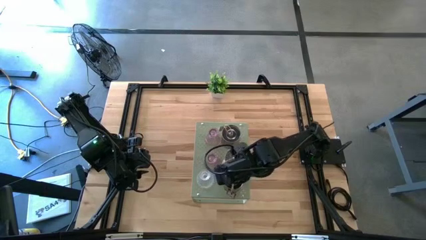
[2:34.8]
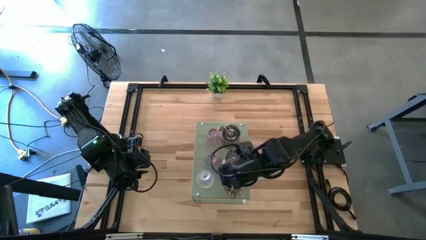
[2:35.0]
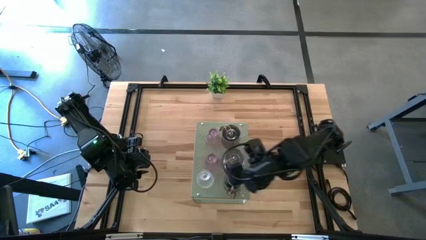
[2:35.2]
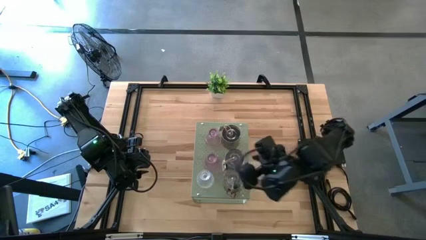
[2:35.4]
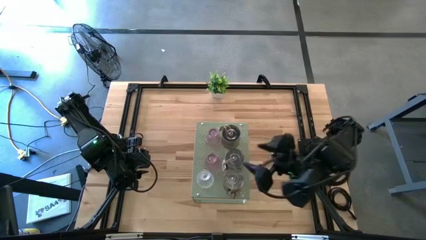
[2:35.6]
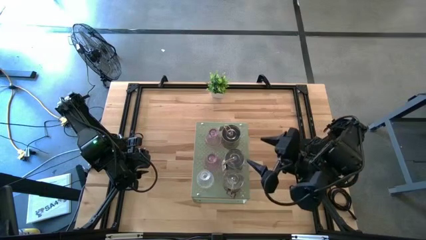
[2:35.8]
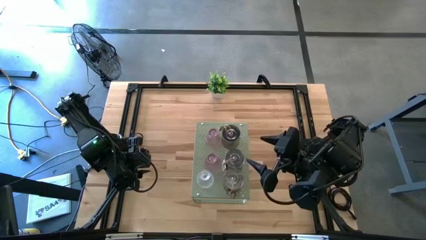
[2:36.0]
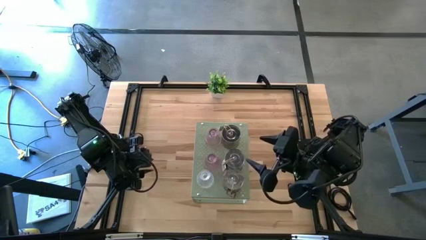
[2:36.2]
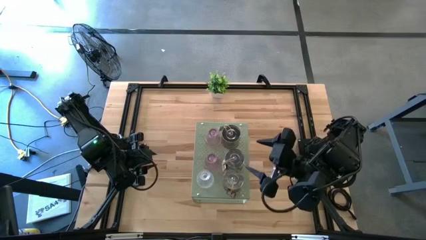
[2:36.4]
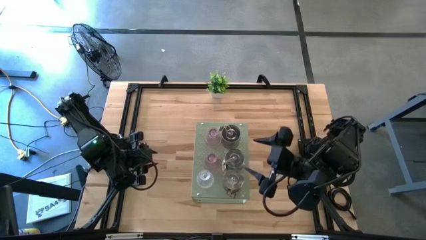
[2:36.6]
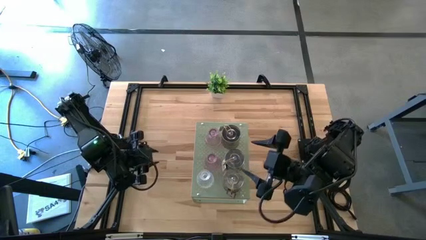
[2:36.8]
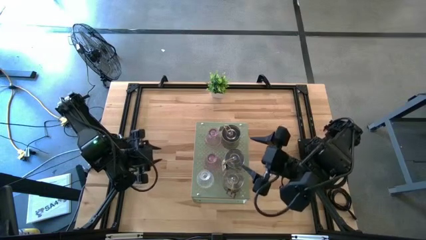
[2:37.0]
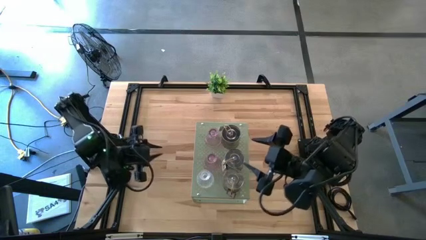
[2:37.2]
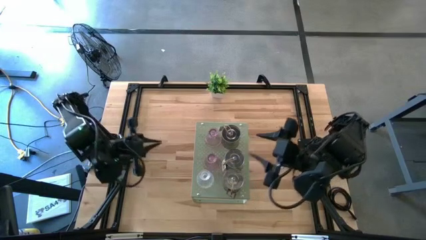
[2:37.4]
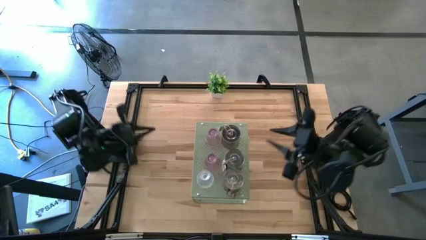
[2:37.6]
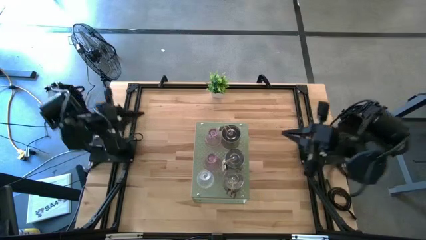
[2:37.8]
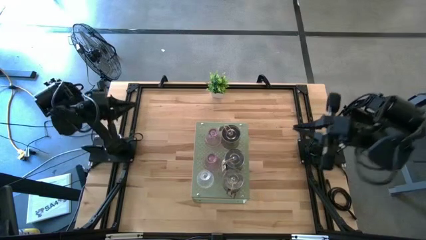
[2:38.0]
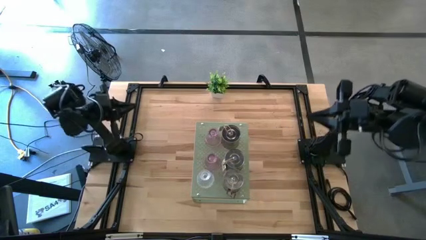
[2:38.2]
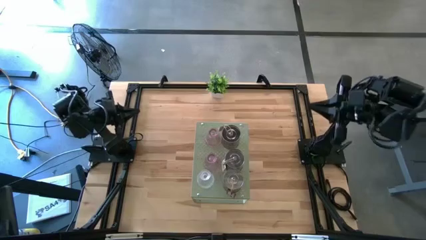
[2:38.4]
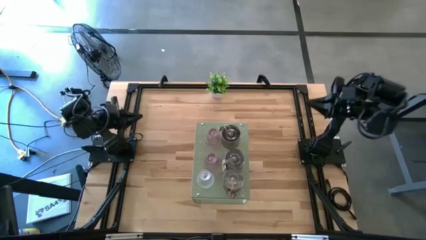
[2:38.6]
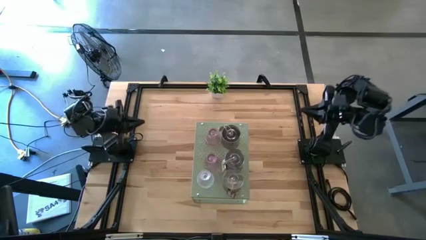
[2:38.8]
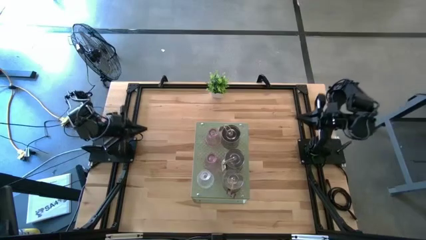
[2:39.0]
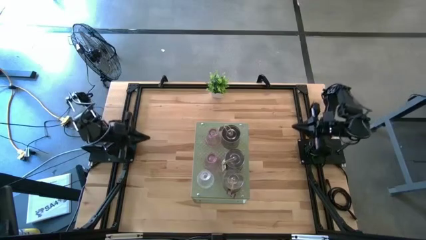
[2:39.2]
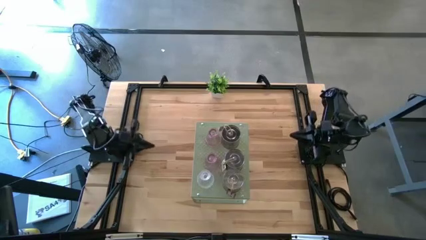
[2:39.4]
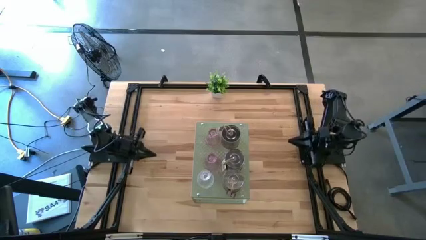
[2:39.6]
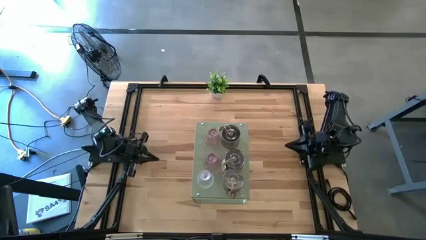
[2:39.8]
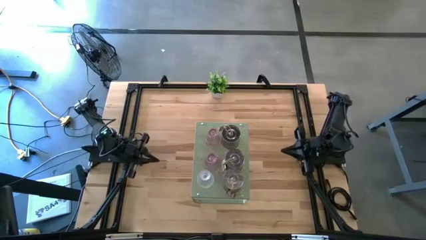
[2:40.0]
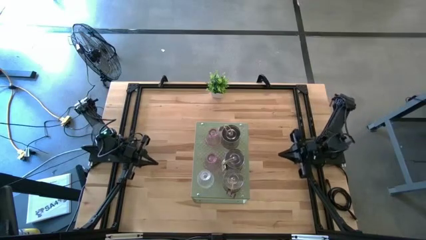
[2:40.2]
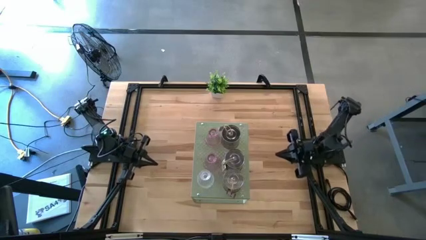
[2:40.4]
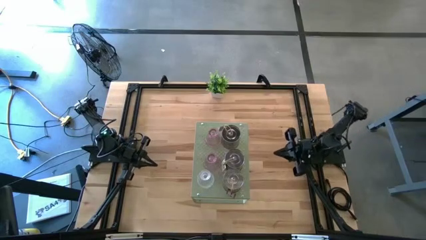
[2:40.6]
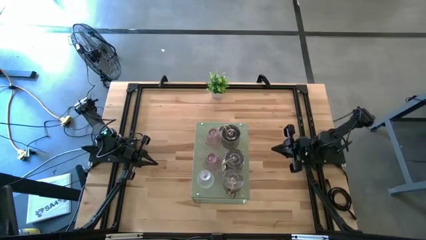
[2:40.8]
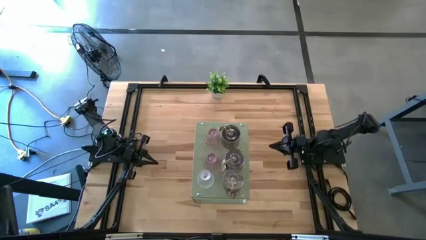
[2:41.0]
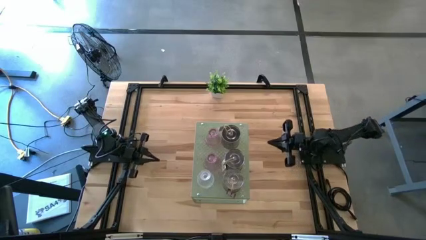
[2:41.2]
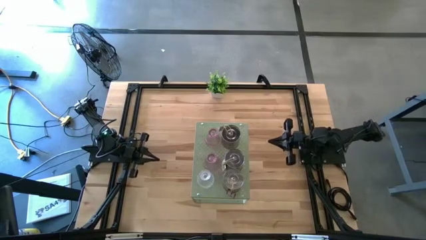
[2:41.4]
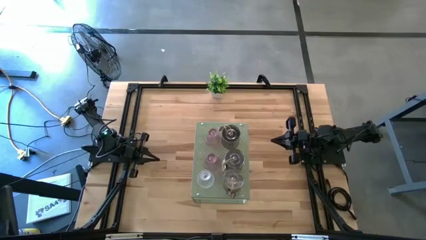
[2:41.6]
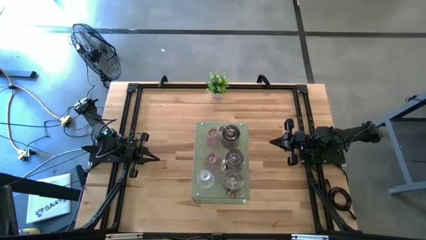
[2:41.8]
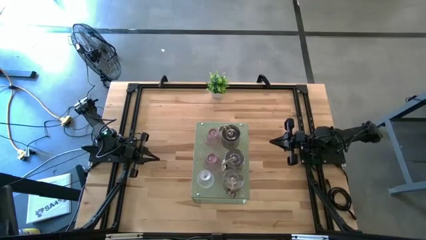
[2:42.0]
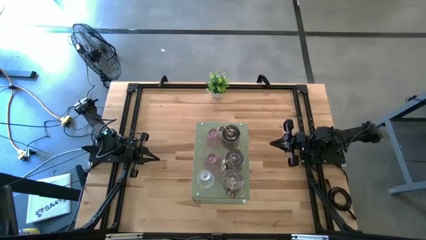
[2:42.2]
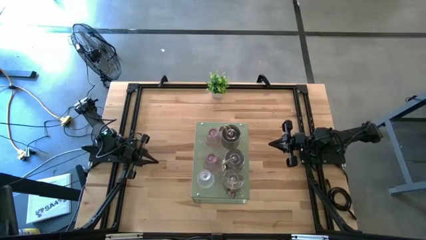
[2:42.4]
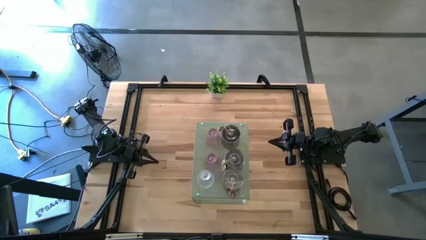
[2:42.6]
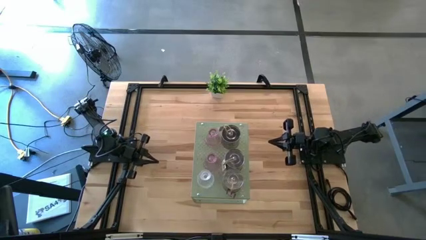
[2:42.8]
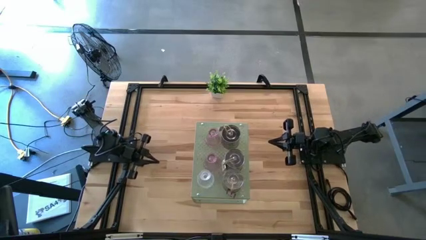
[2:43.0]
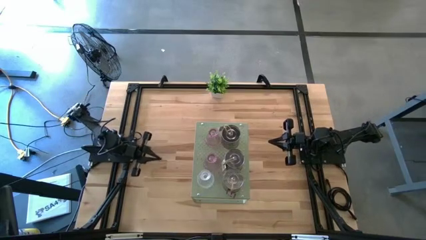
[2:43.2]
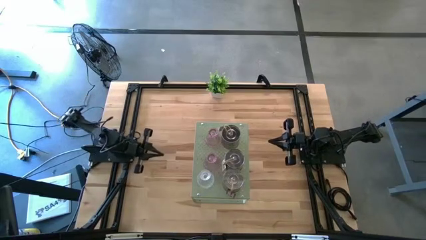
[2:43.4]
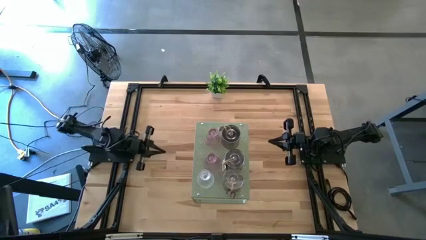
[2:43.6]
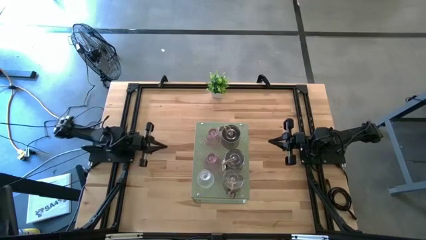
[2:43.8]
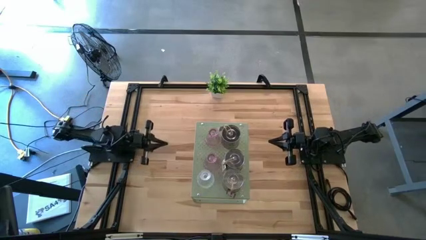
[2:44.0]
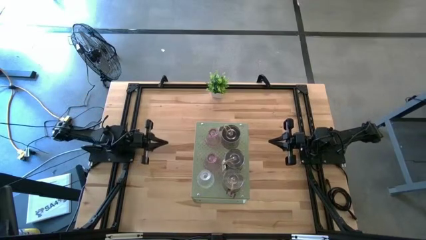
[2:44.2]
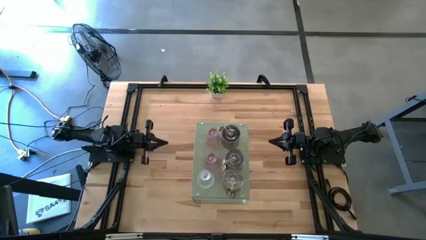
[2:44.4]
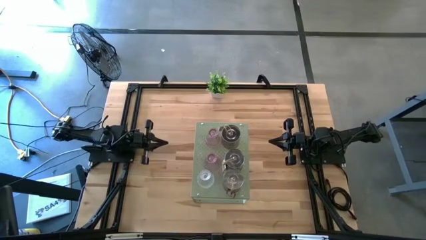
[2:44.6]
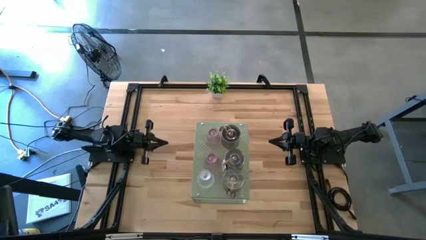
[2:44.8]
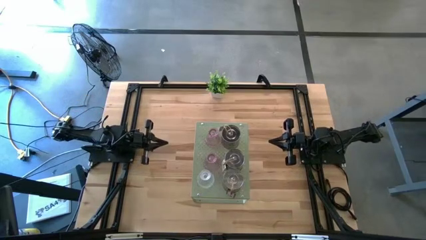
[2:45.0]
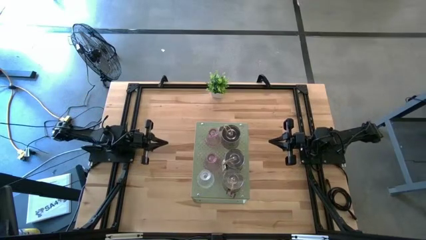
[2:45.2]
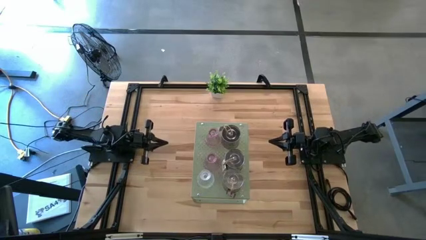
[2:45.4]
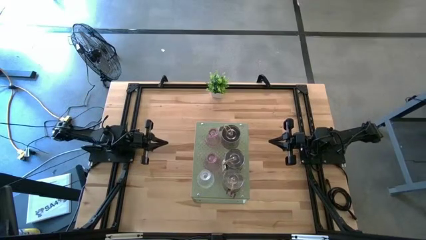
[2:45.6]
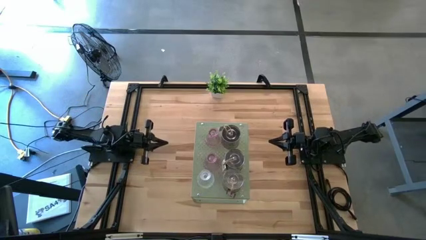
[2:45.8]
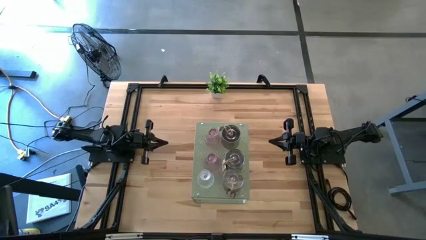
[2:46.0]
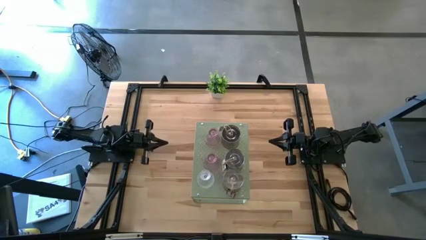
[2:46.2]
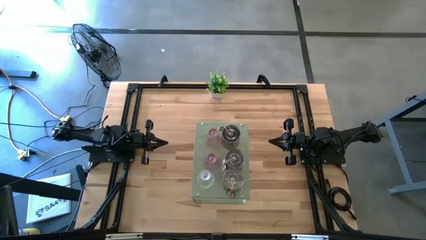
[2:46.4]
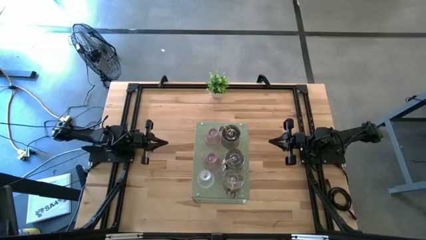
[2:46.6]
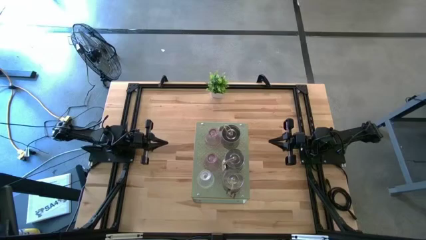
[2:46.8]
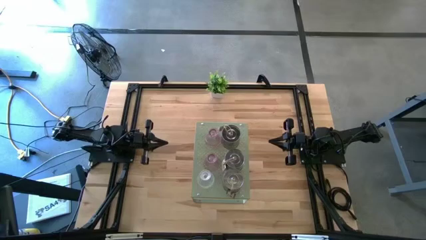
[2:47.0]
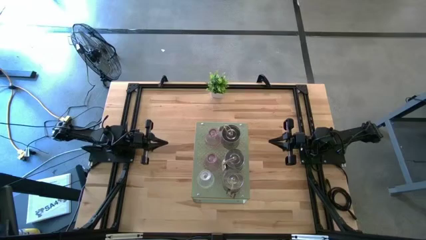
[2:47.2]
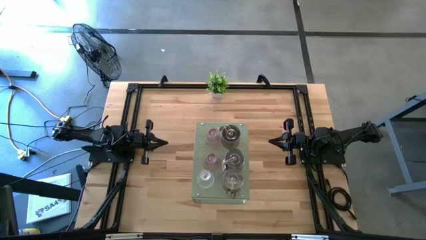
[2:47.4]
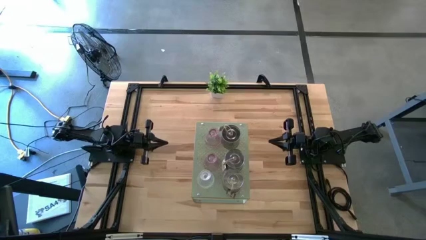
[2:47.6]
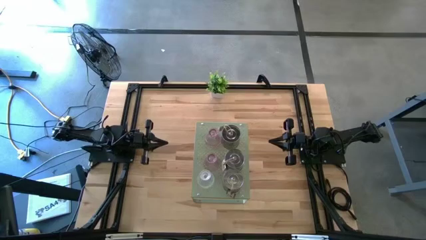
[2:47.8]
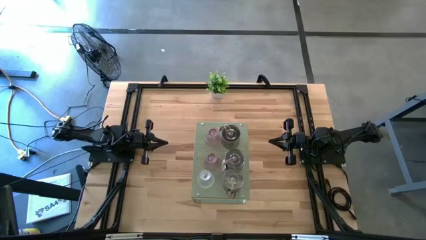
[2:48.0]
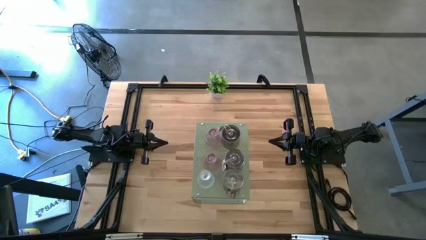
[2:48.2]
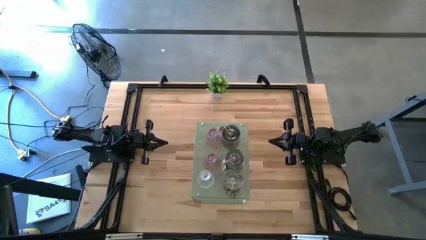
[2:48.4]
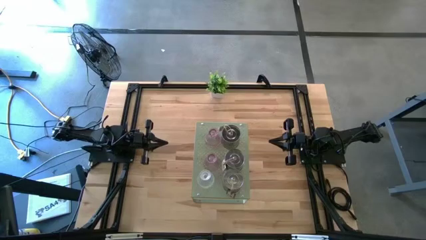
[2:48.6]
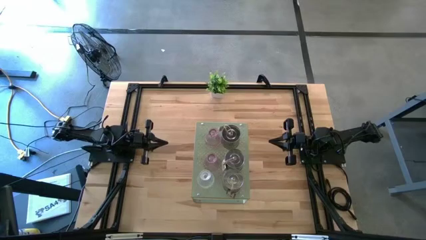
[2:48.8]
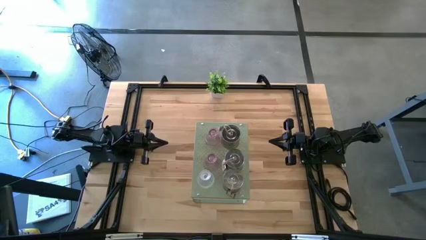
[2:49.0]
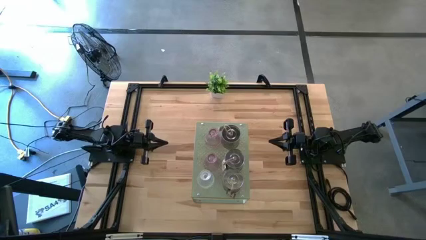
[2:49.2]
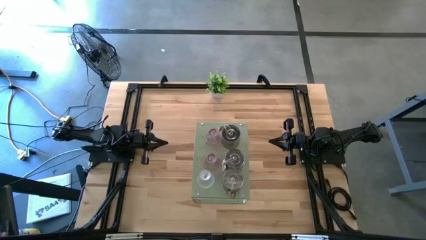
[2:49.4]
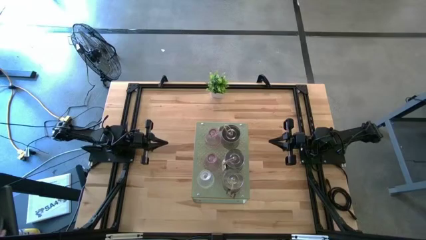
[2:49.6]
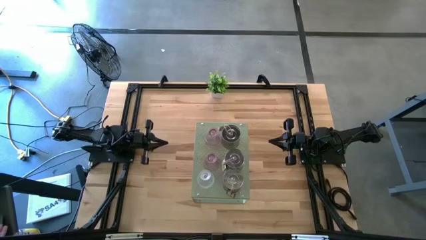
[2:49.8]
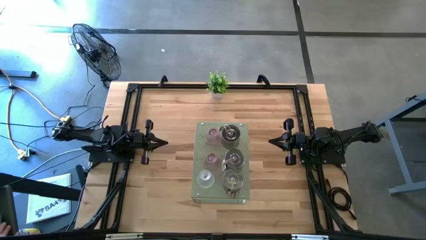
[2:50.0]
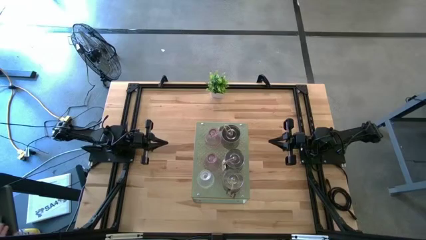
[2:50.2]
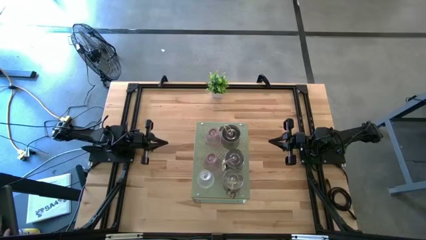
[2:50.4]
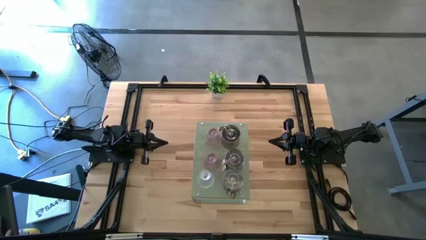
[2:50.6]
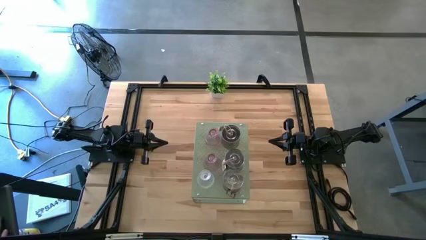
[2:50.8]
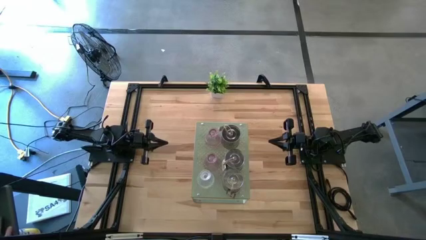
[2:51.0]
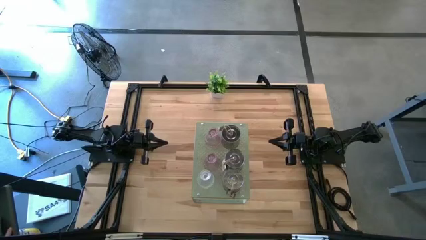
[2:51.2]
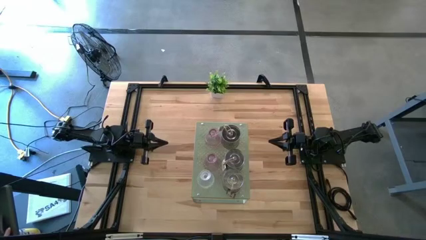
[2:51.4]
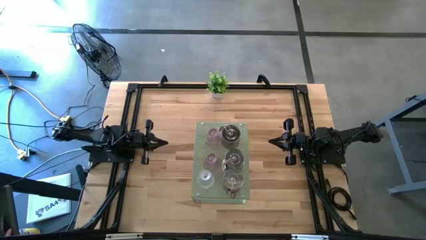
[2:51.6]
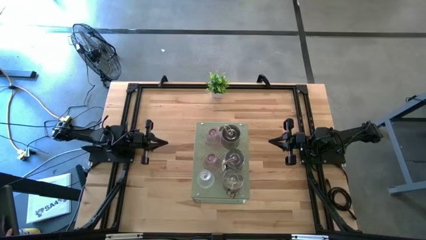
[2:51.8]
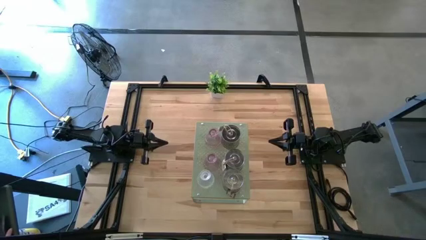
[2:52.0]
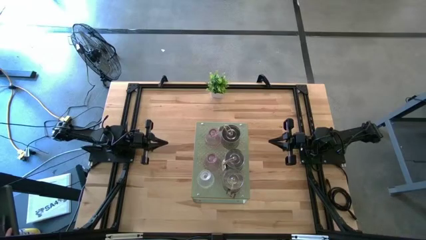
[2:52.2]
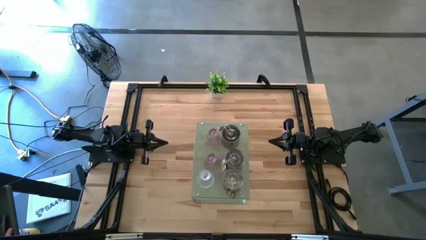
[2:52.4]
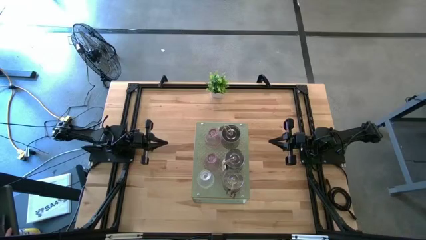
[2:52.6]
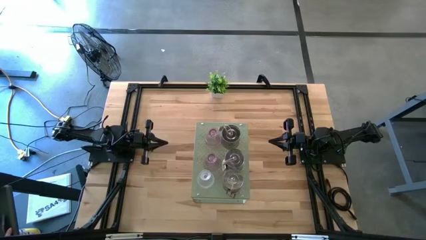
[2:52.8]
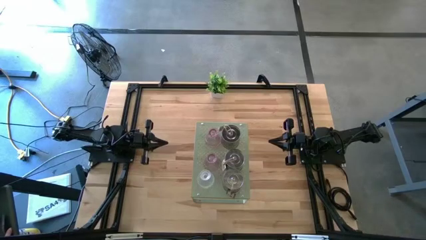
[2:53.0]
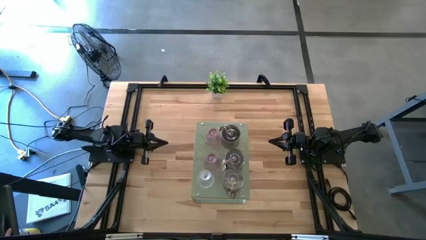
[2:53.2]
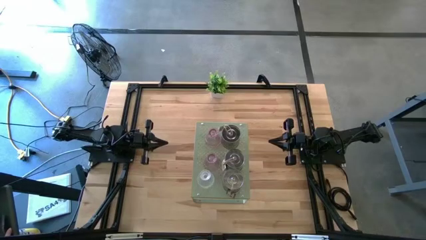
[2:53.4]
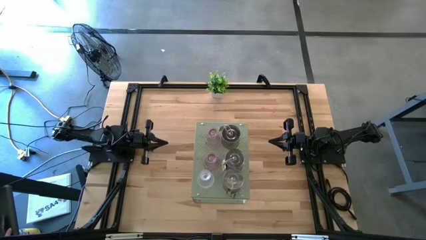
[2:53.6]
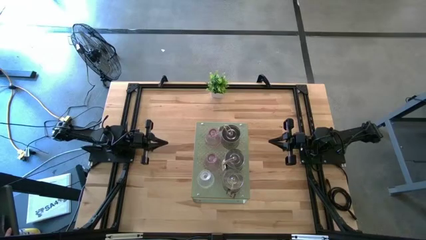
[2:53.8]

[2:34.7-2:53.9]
Task: Pick & Place candle stick holders
Return to Home Position
